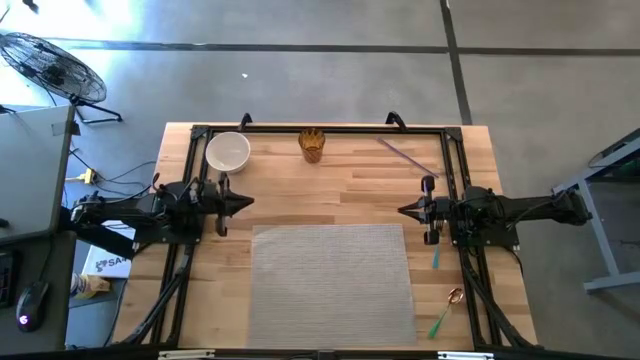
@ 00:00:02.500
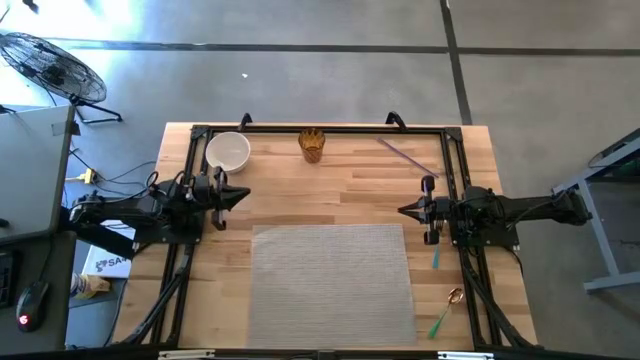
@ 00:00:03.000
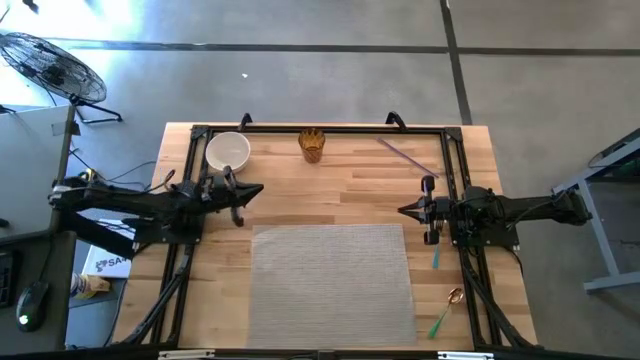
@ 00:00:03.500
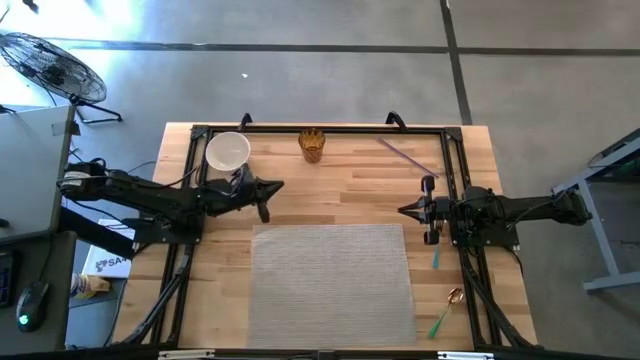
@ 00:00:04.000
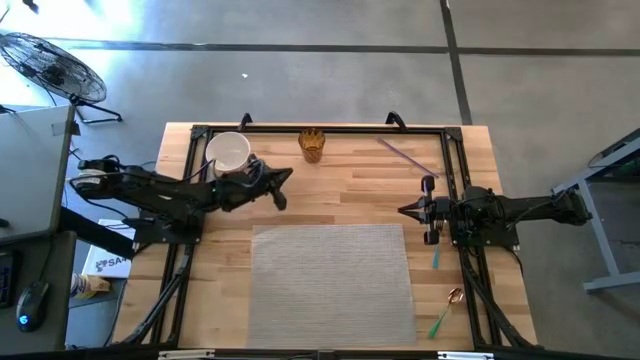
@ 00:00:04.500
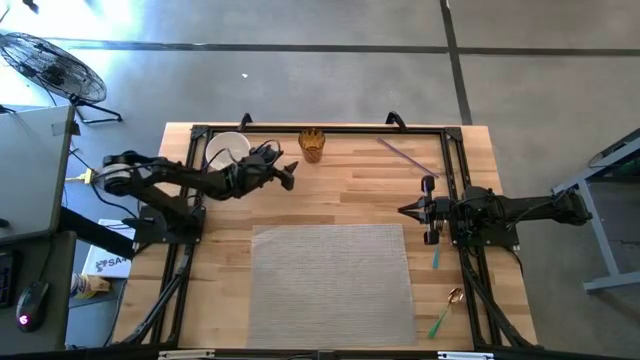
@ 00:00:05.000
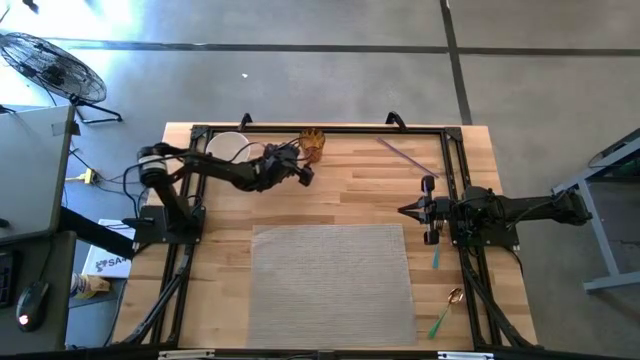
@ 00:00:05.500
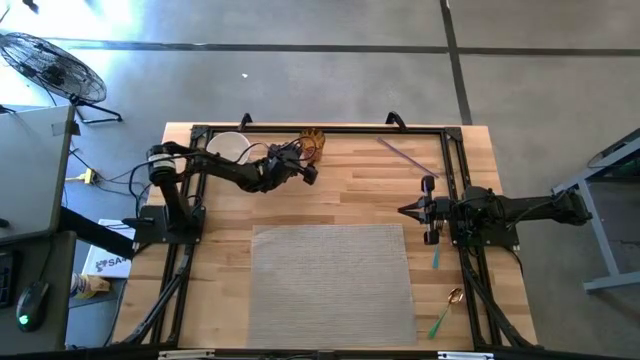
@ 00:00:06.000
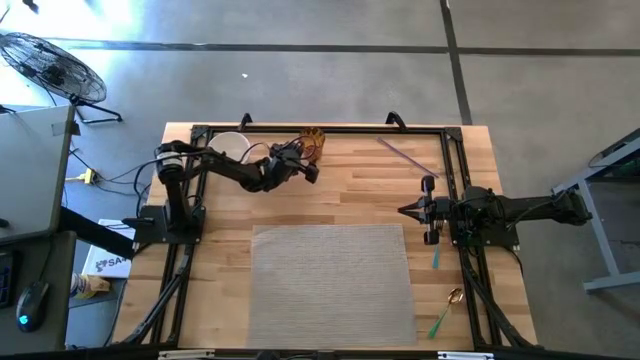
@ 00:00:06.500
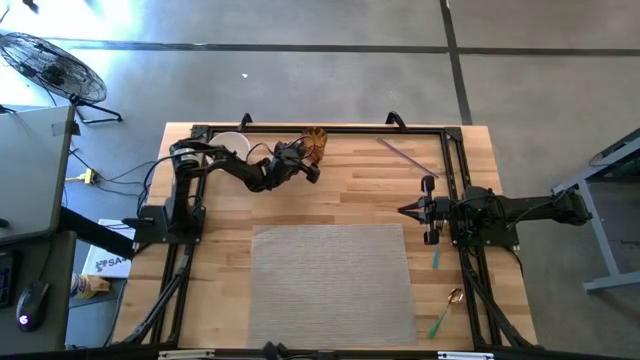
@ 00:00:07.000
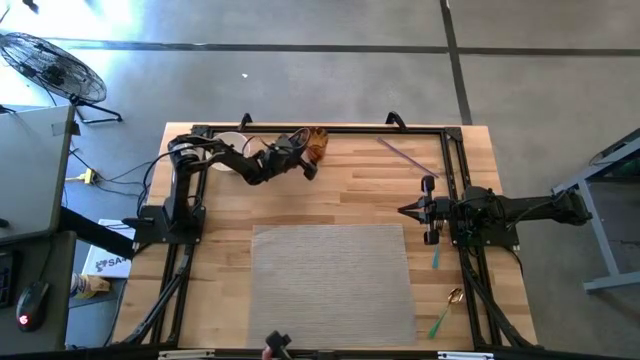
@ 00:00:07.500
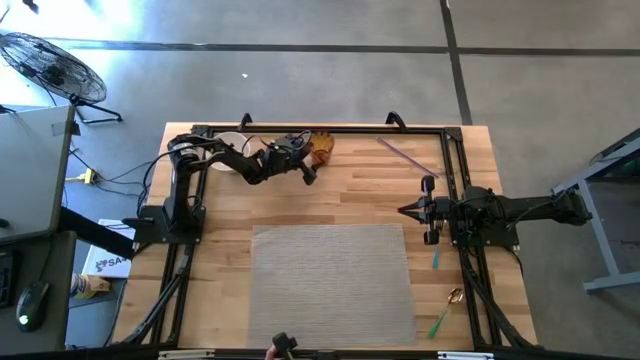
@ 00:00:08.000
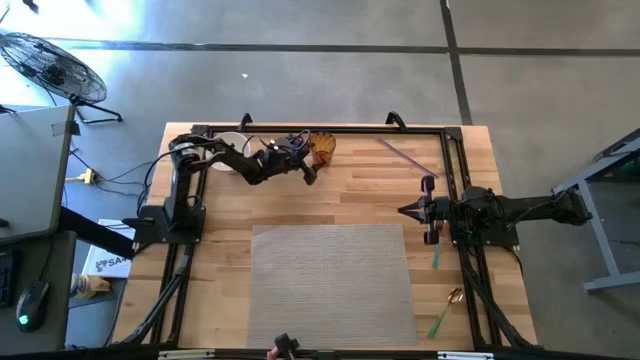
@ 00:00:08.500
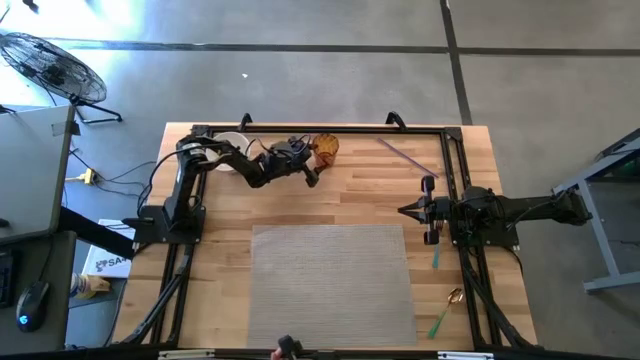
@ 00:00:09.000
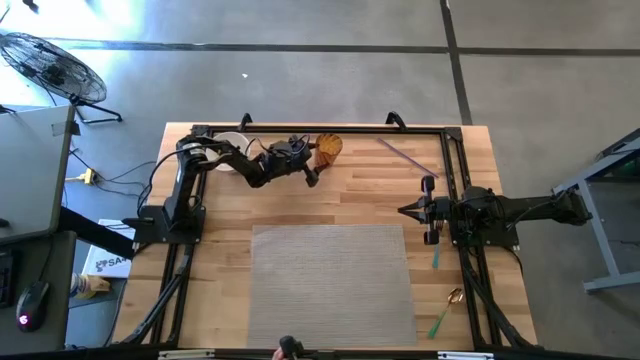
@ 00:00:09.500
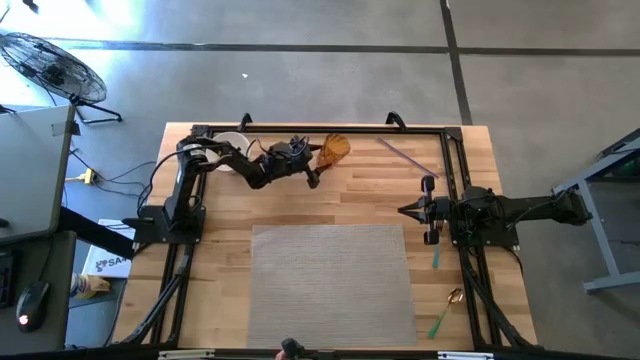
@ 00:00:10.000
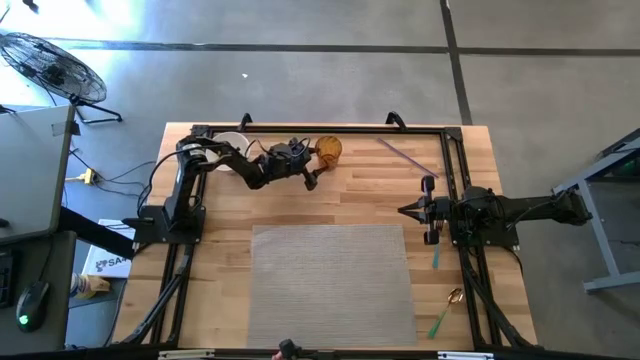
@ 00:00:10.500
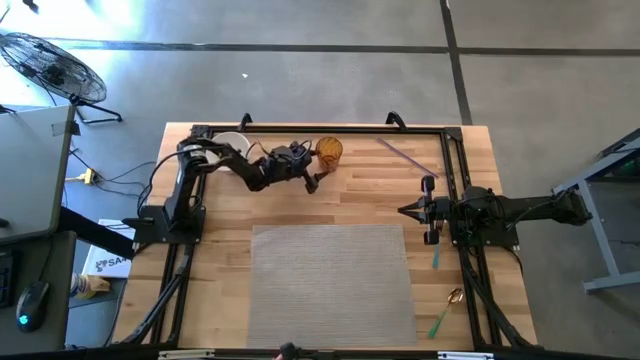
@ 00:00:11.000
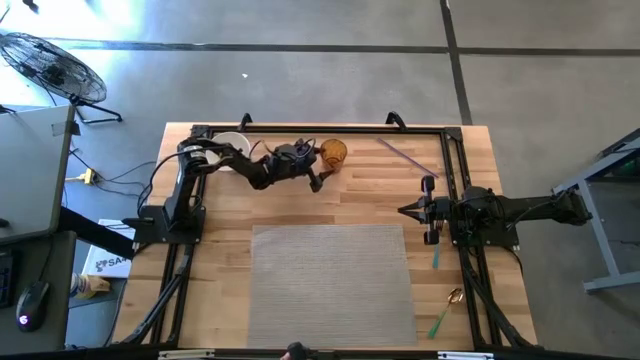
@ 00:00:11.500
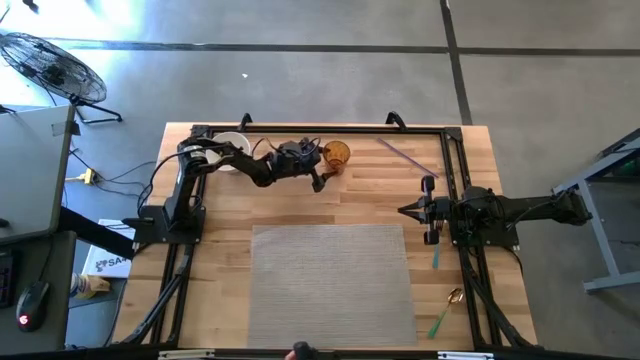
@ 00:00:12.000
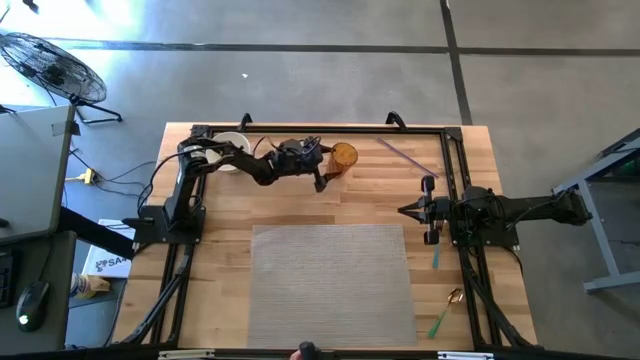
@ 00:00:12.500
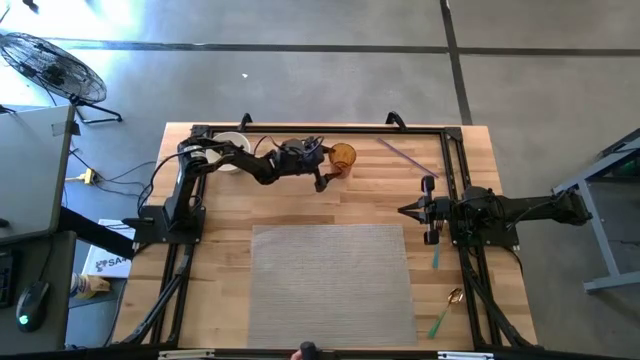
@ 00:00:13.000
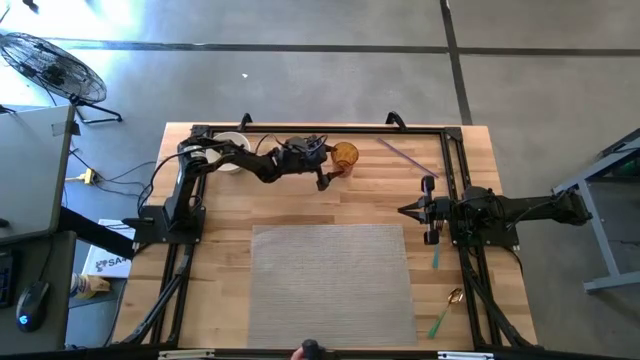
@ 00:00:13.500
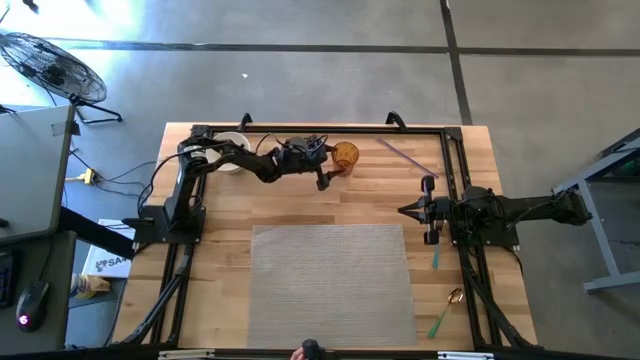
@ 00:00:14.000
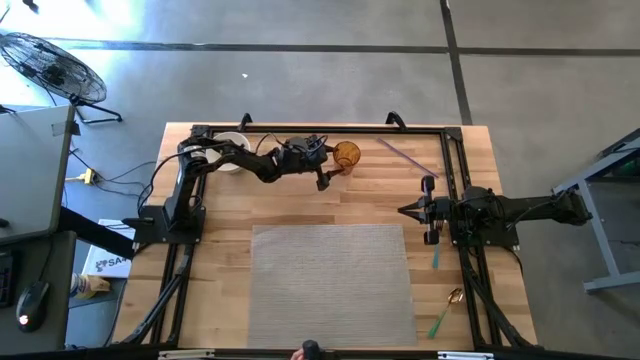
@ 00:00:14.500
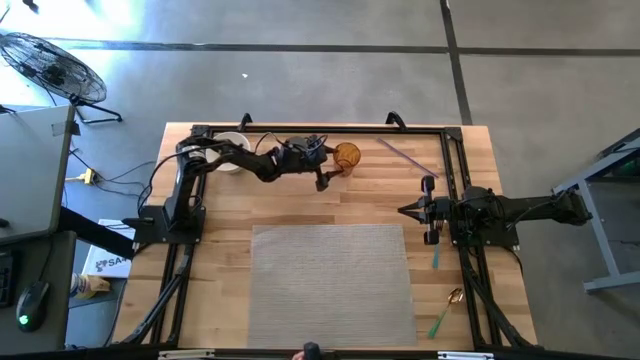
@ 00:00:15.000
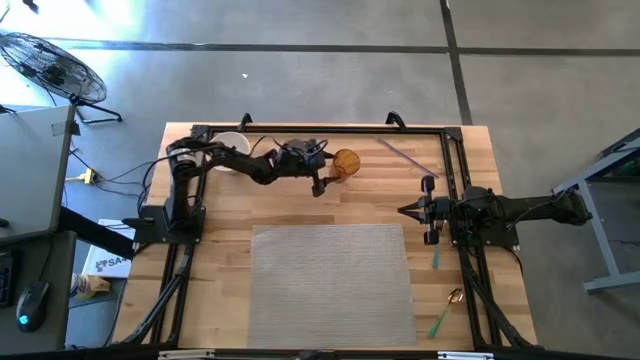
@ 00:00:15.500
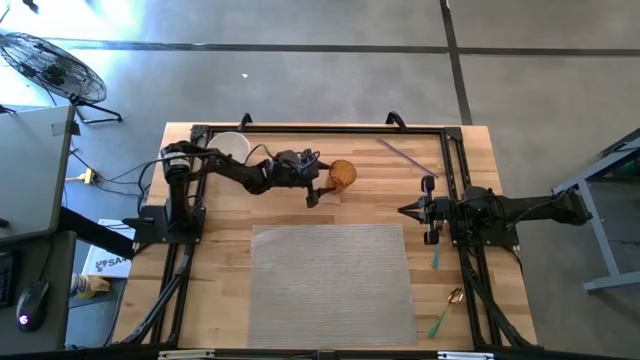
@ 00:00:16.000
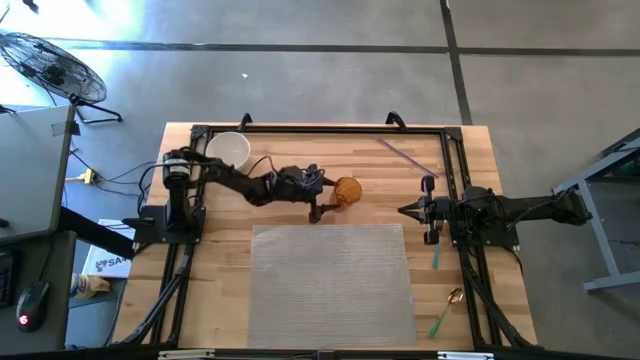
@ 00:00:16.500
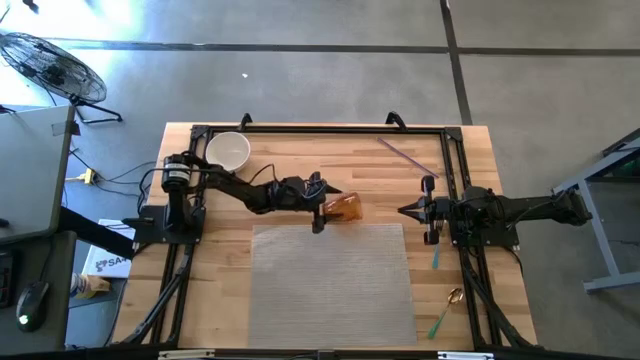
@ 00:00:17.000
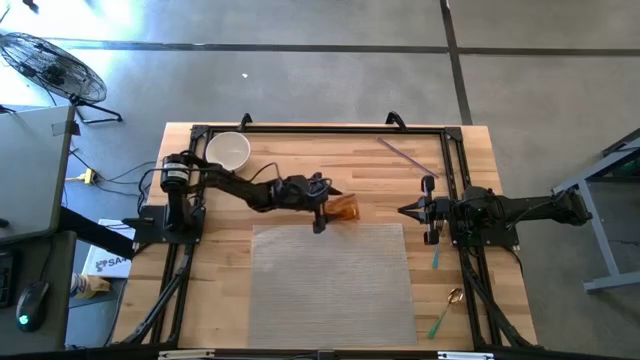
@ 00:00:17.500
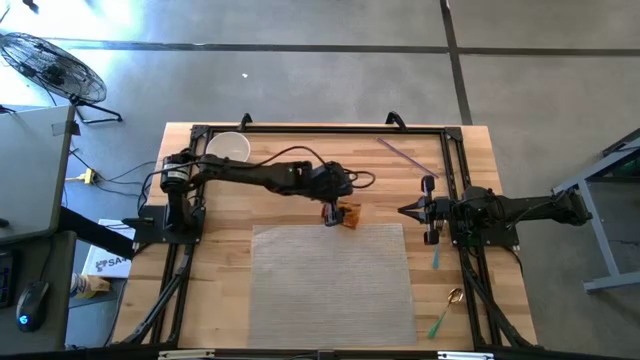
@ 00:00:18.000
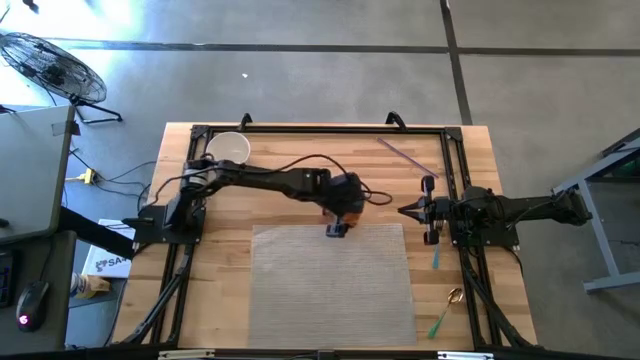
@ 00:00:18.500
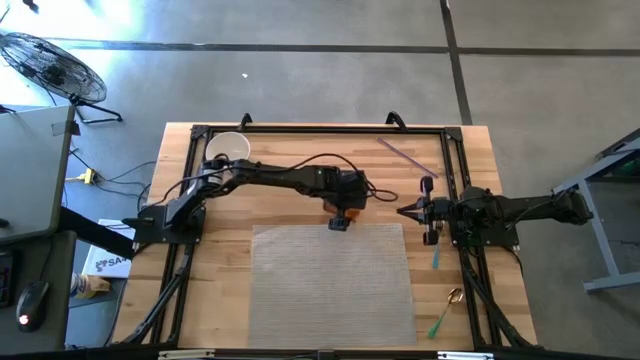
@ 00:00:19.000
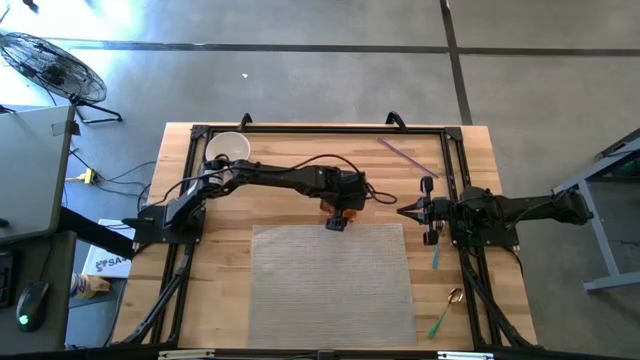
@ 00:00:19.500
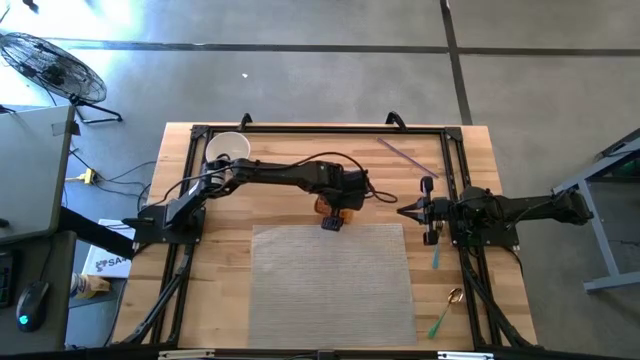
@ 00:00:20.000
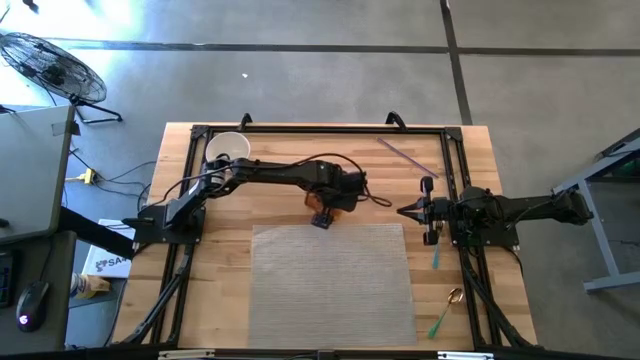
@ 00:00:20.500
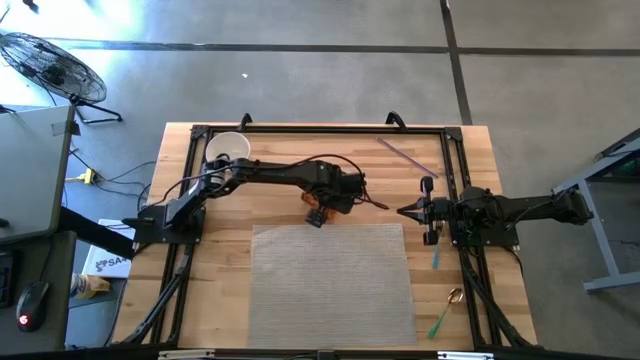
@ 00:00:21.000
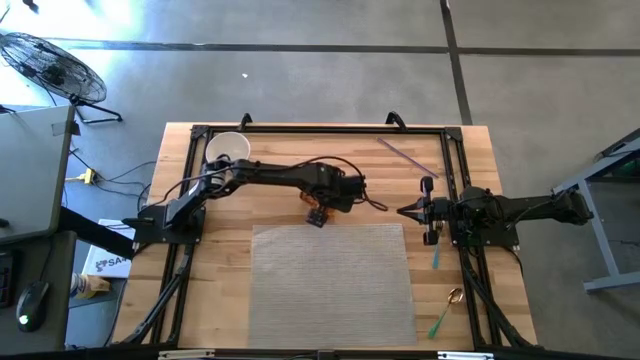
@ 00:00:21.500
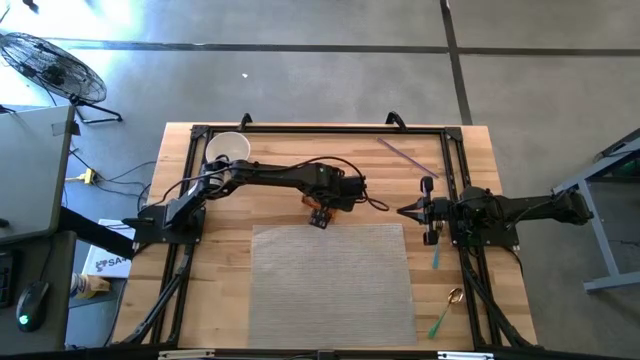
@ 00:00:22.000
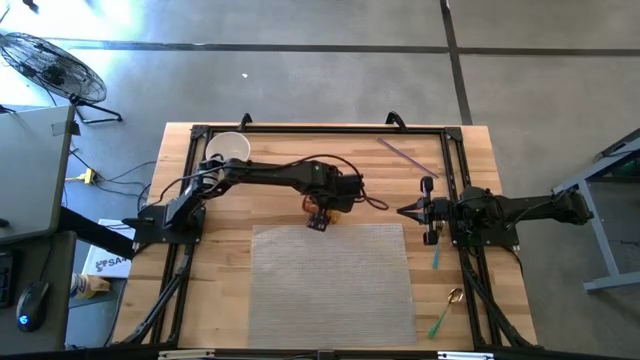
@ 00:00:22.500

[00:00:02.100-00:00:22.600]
Task: Pick & Place Utensil
Put the brown cup on the gray mat
